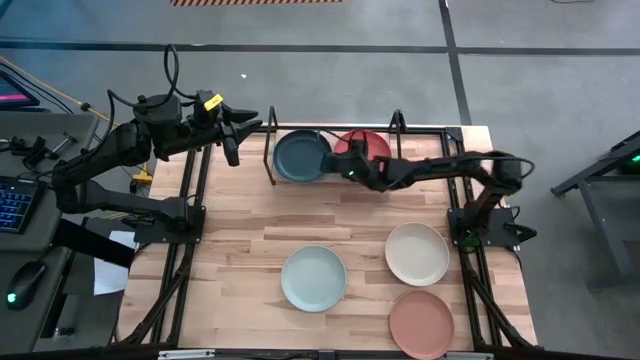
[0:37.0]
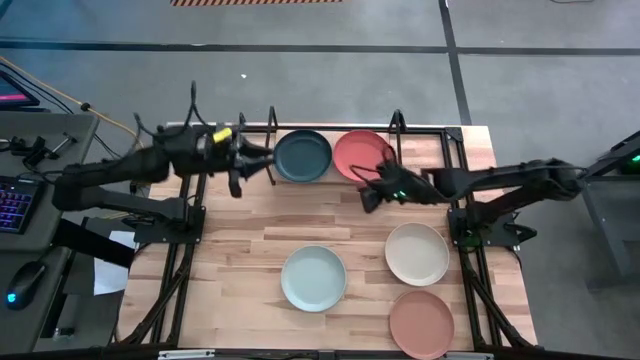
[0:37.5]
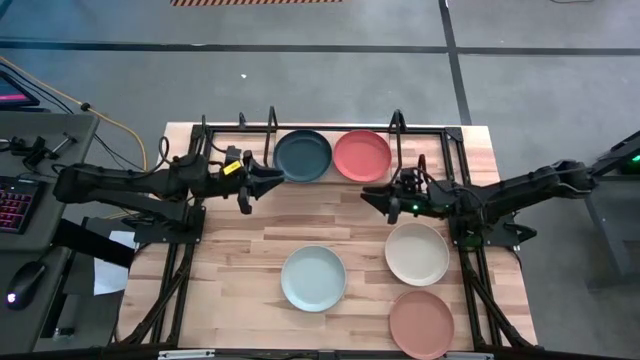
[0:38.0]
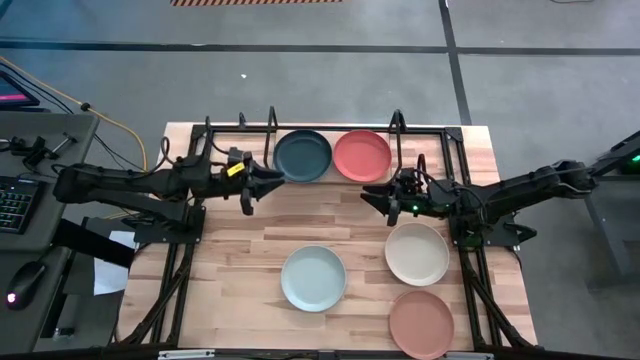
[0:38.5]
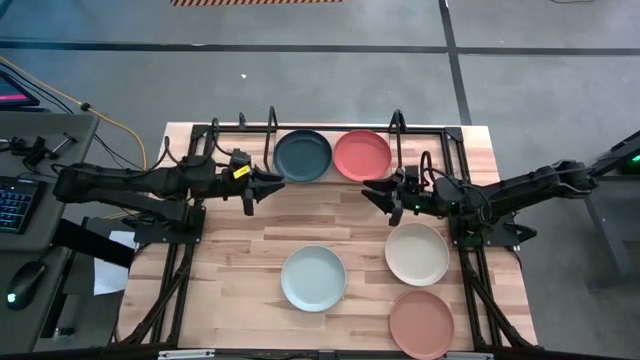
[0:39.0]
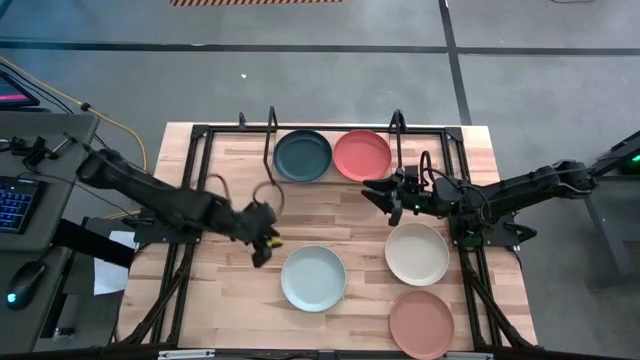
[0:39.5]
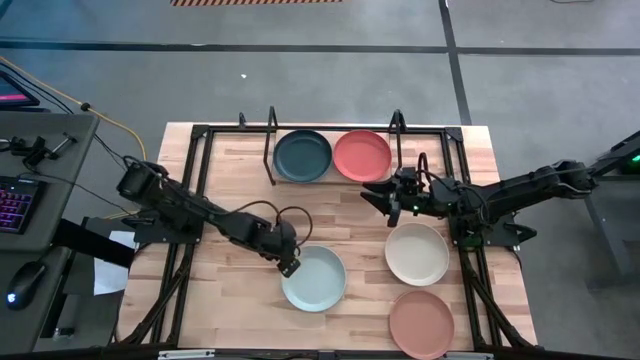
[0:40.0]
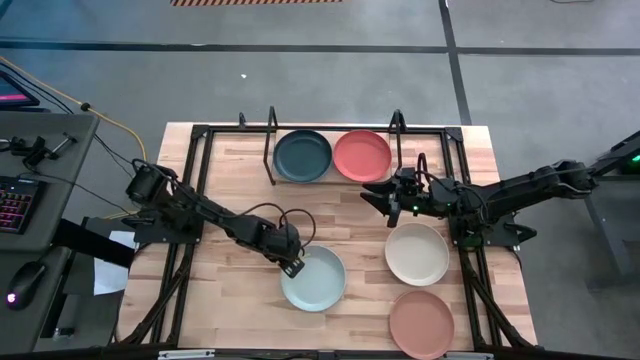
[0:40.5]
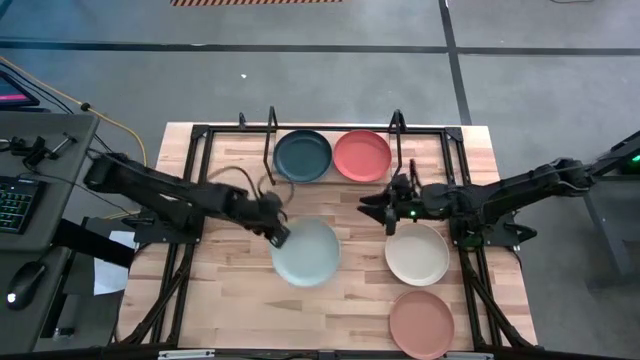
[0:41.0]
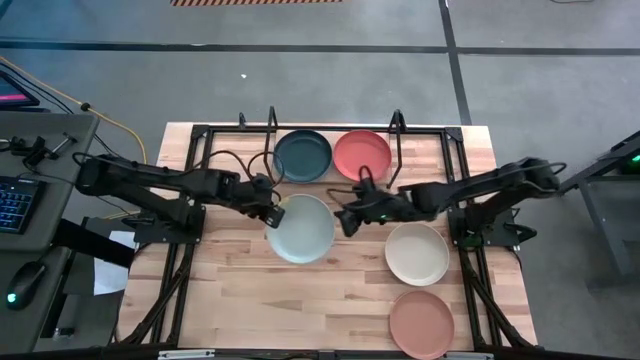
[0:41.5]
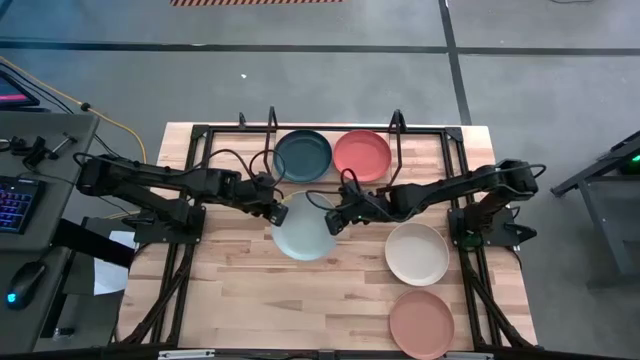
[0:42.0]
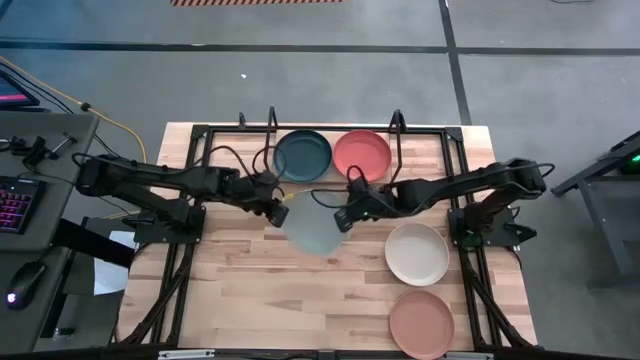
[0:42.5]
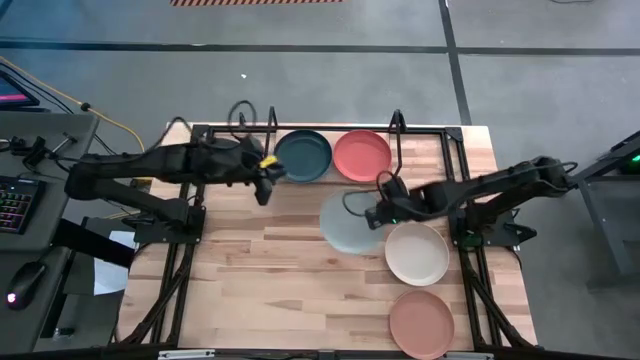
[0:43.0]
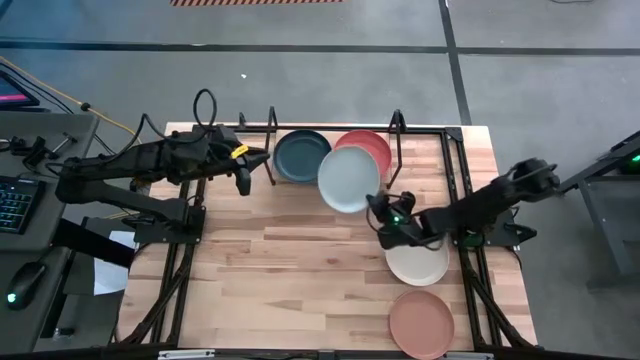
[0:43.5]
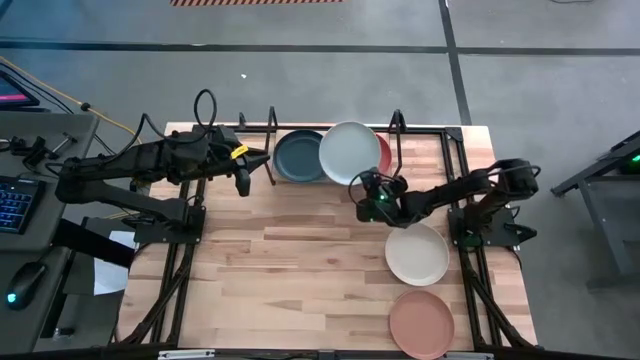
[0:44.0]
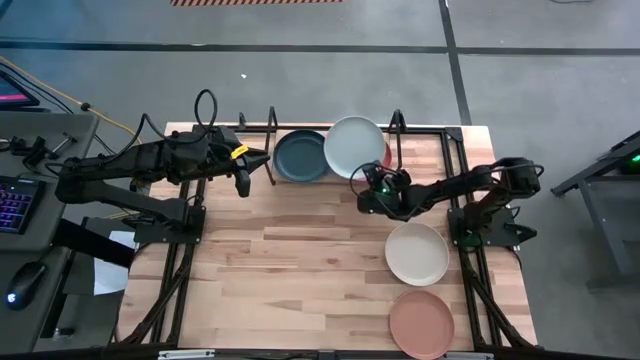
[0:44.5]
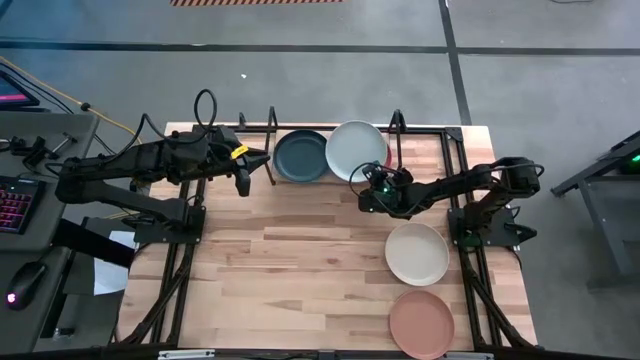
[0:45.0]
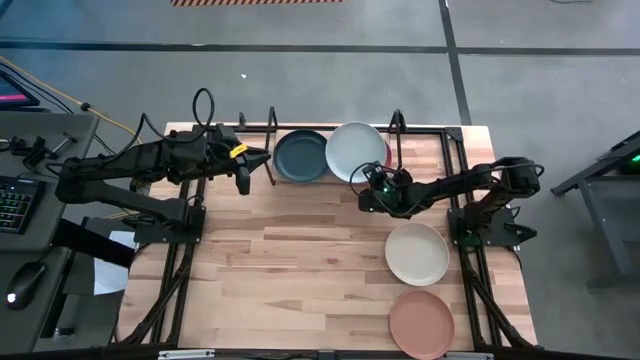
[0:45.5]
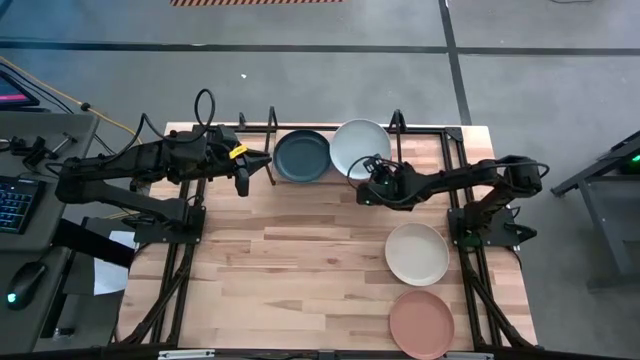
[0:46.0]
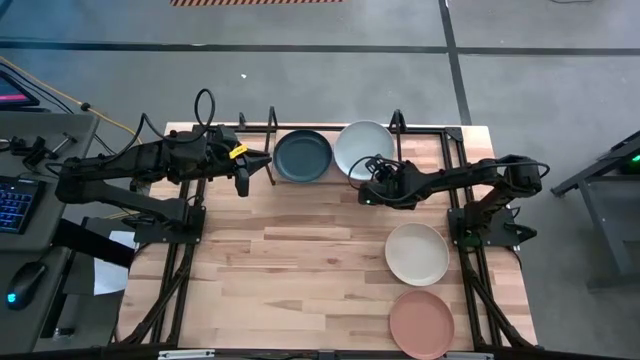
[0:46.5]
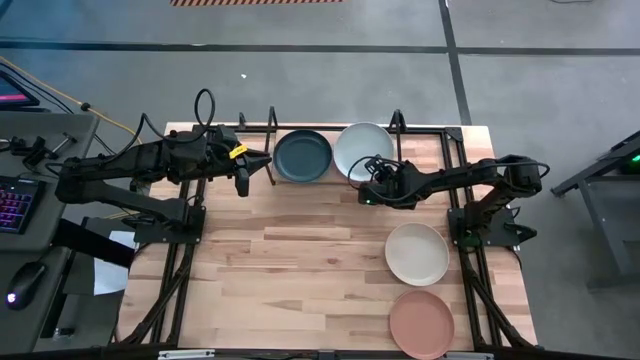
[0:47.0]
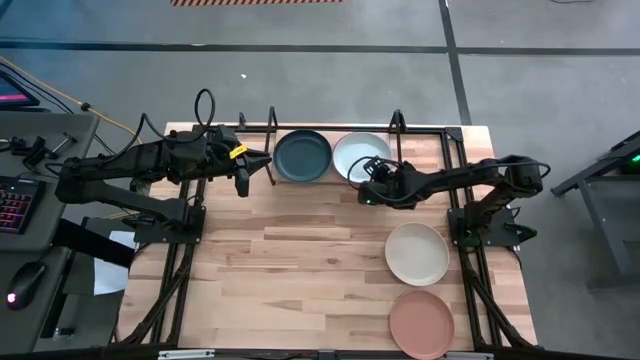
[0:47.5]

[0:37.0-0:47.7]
Task: Place and stack plates onto a shelf
Stack the white plate on the orange plate on the shelf

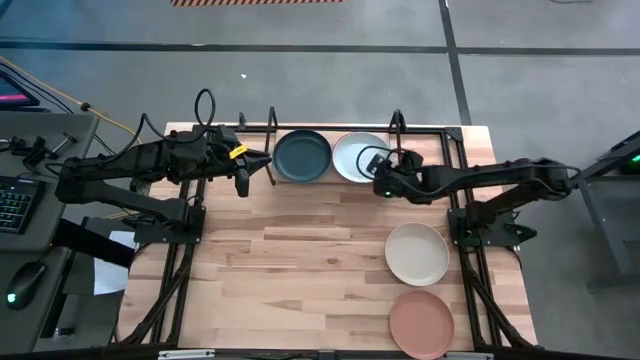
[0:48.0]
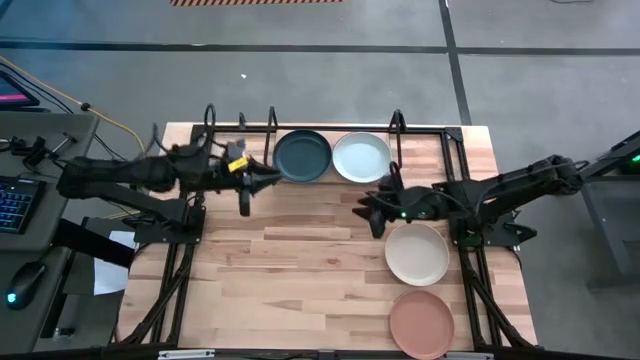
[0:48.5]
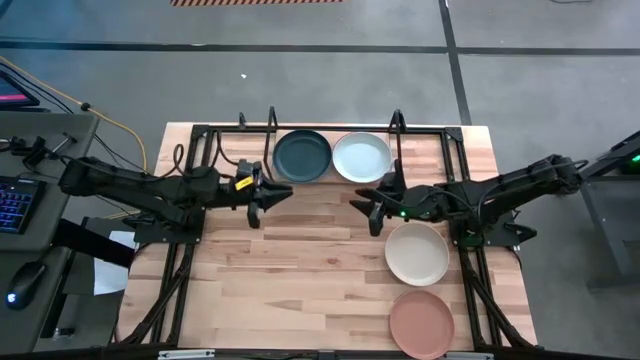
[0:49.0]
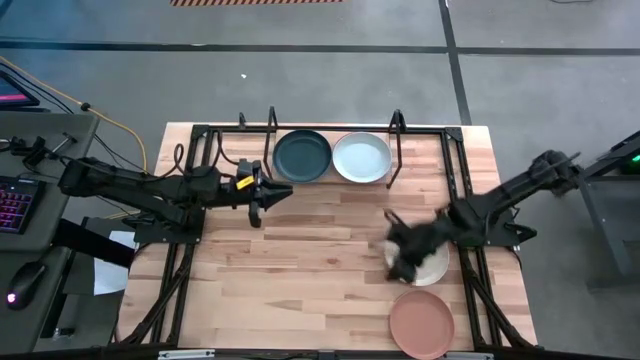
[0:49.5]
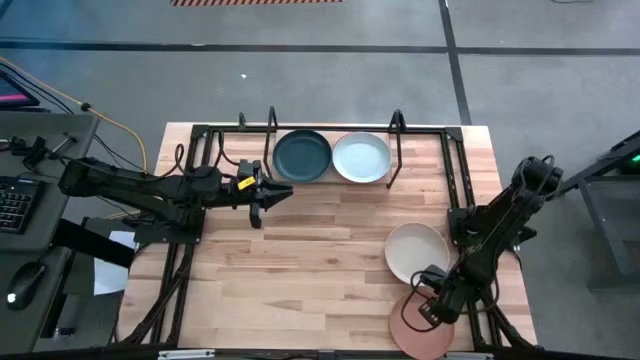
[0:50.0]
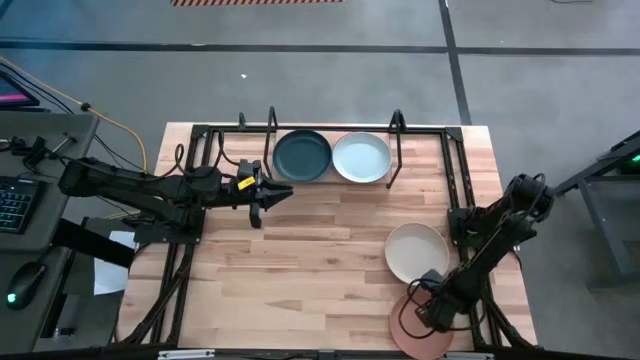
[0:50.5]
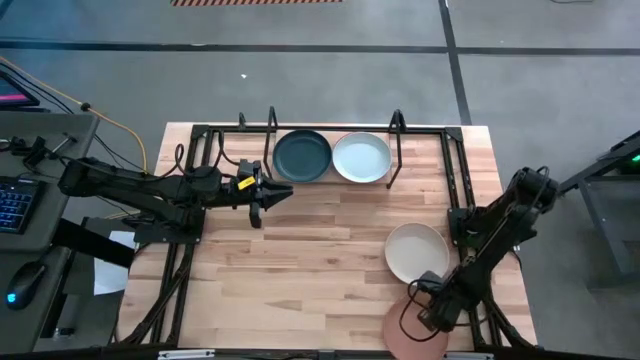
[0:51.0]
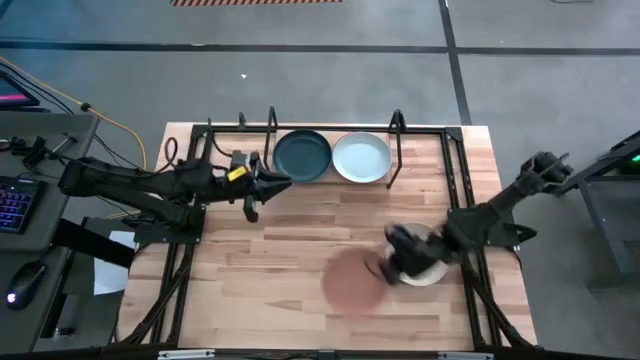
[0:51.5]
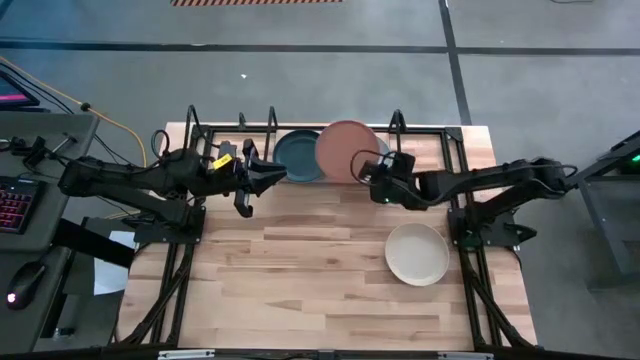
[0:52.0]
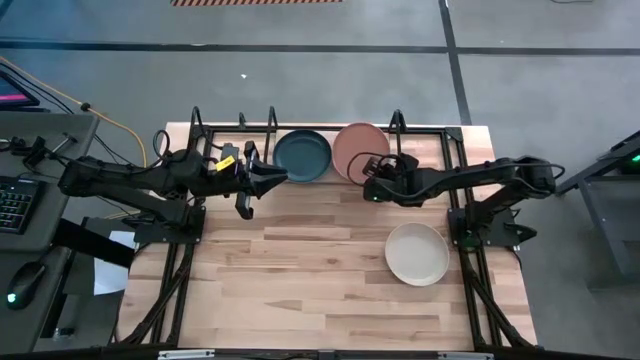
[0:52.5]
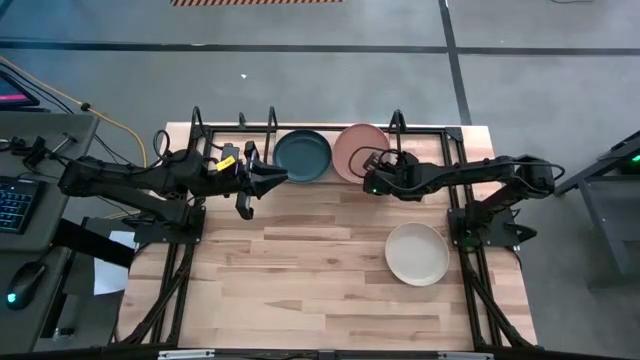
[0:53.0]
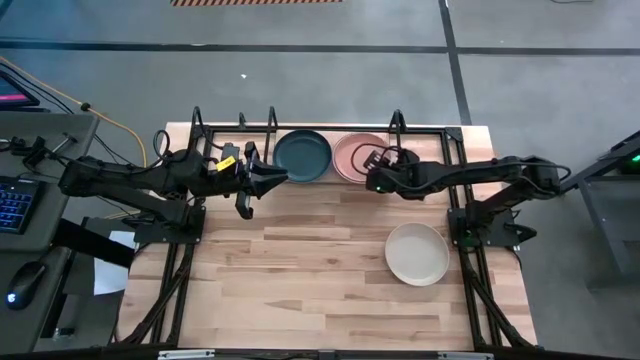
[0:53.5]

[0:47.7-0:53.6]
Stack the brown plate on the white plate on the shelf

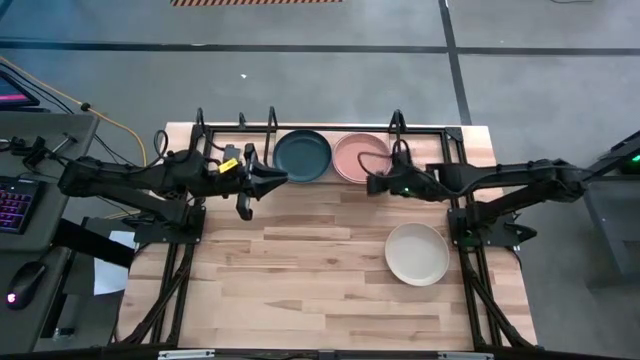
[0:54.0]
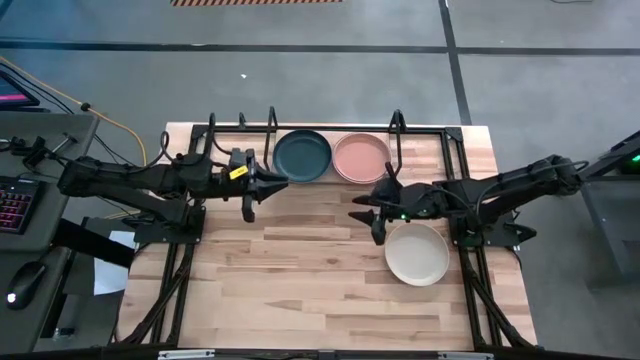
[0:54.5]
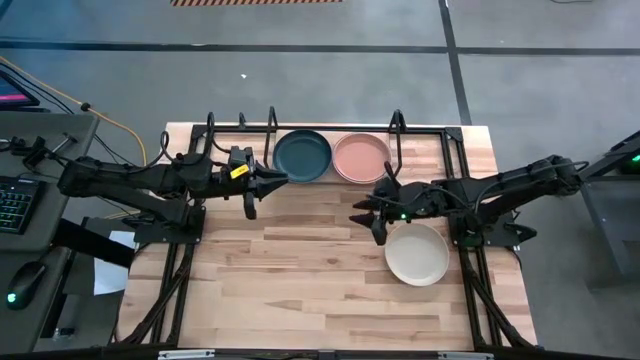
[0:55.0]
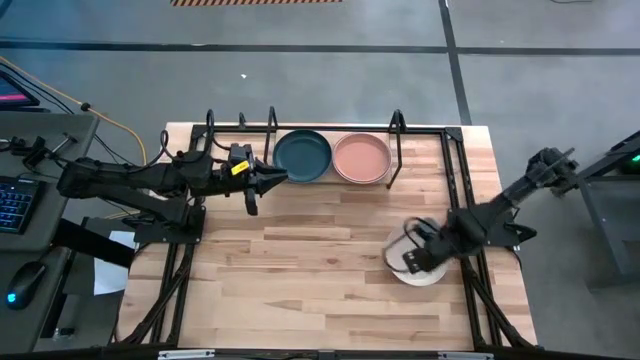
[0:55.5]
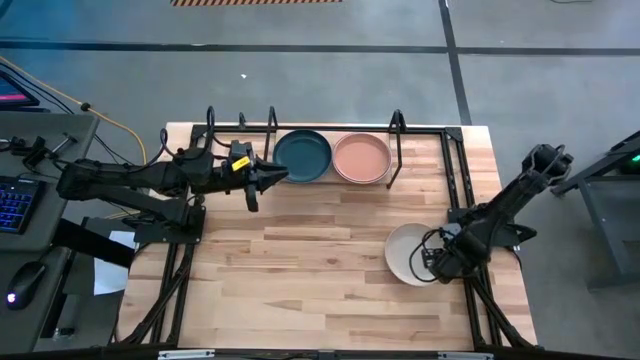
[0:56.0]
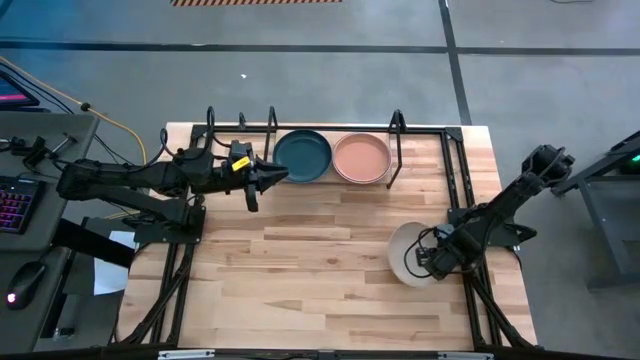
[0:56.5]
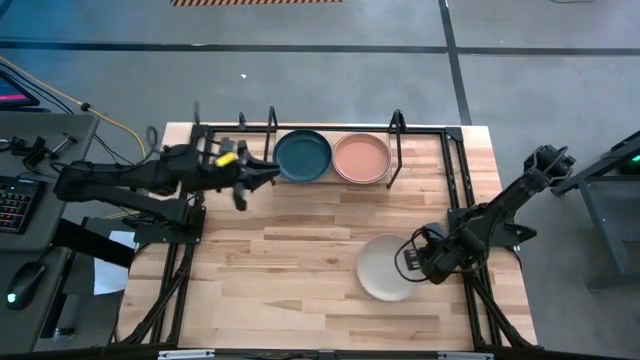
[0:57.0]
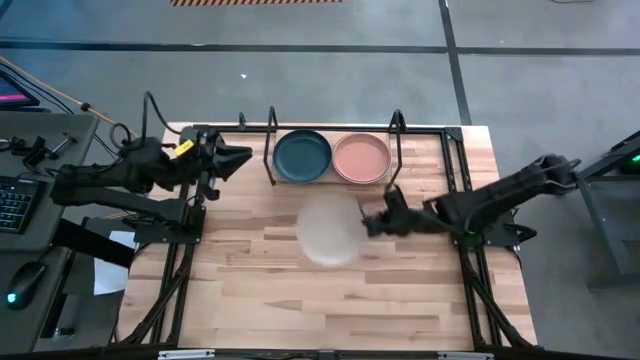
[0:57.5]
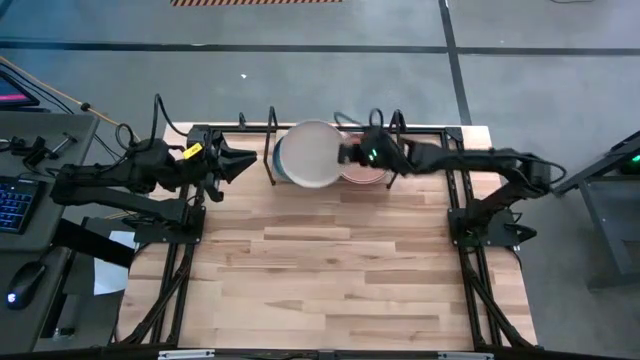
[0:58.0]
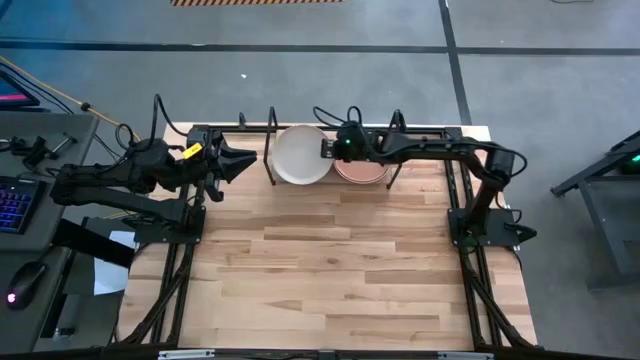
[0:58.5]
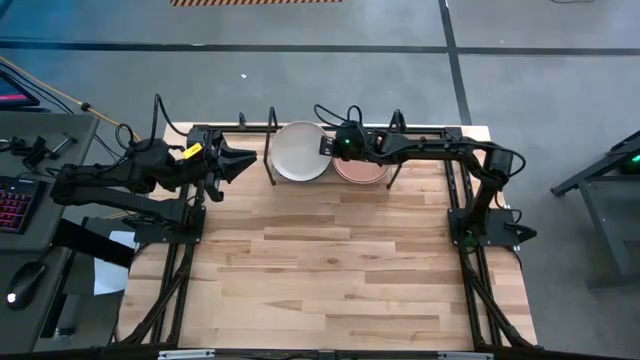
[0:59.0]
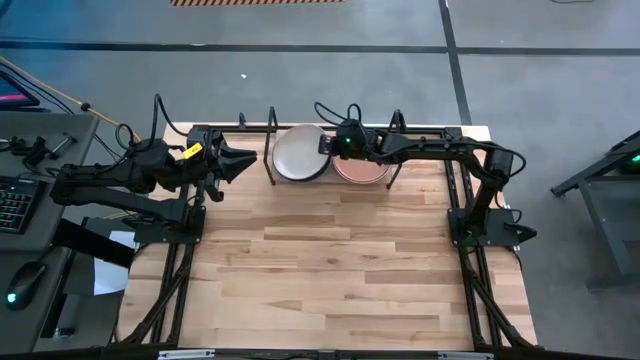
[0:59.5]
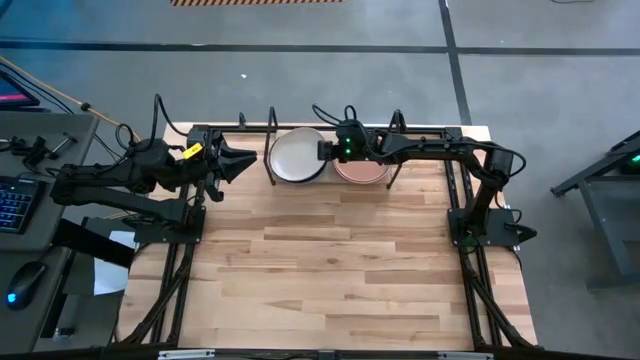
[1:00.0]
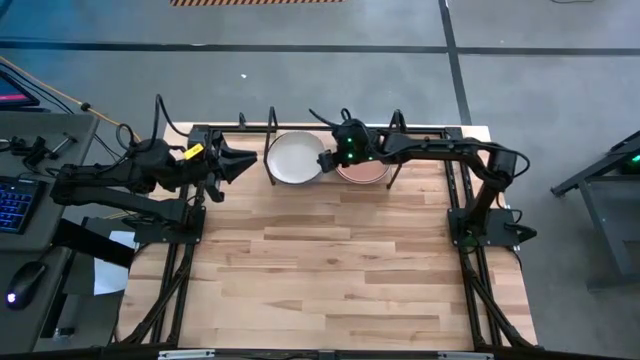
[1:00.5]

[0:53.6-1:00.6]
Stack the gray plate on the black plate on the shelf
